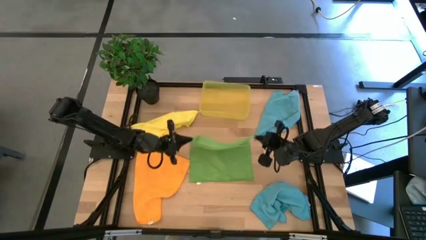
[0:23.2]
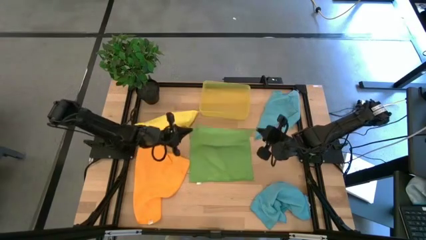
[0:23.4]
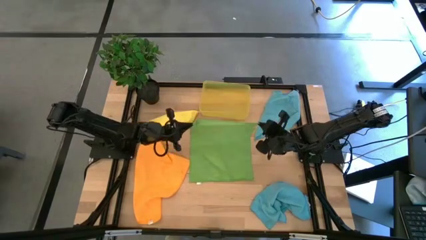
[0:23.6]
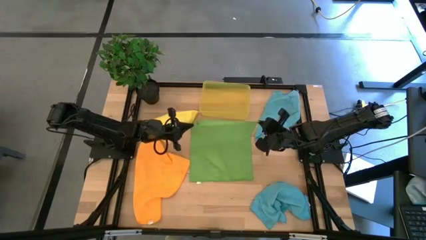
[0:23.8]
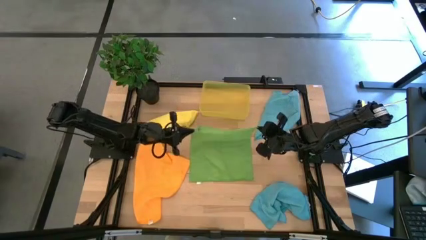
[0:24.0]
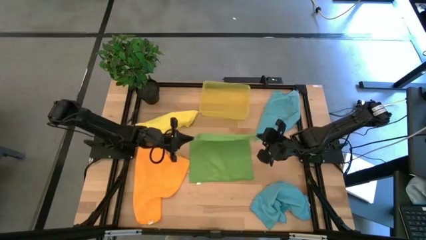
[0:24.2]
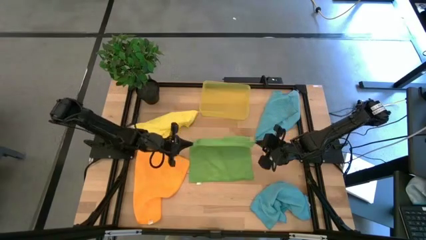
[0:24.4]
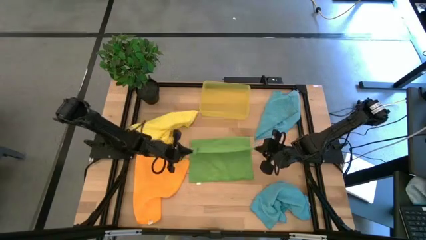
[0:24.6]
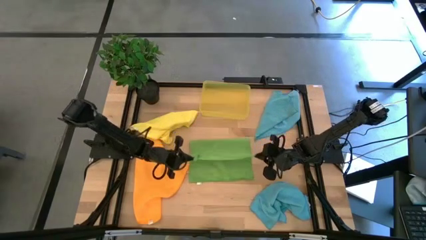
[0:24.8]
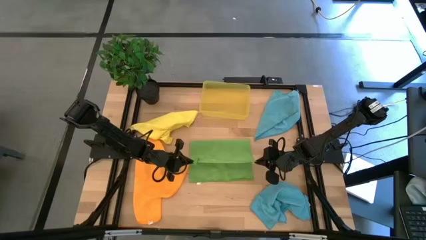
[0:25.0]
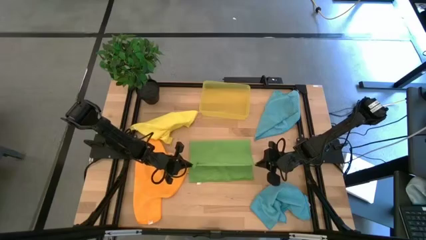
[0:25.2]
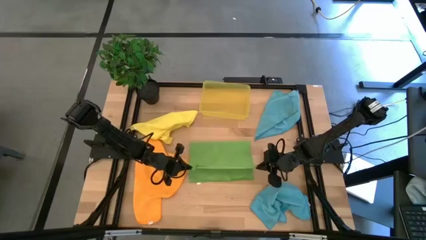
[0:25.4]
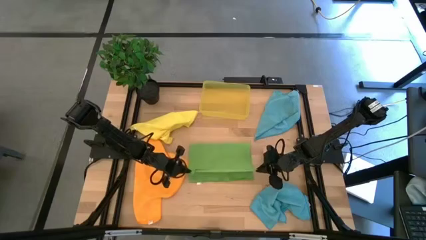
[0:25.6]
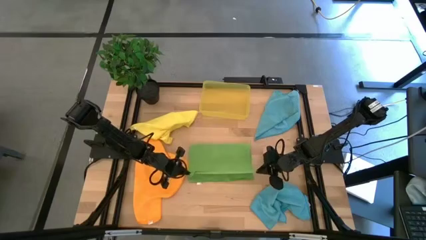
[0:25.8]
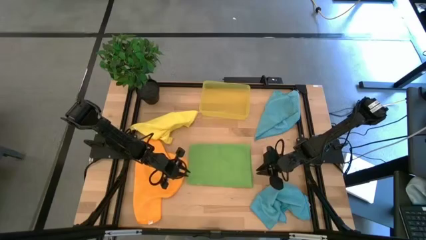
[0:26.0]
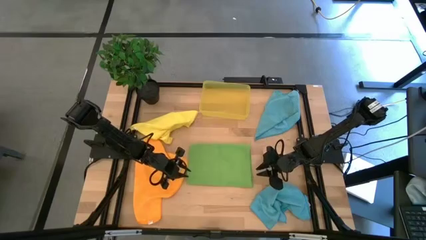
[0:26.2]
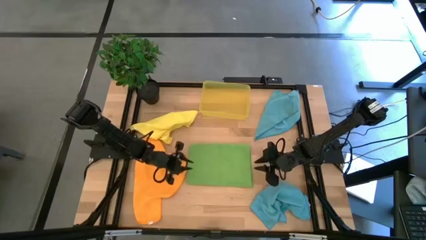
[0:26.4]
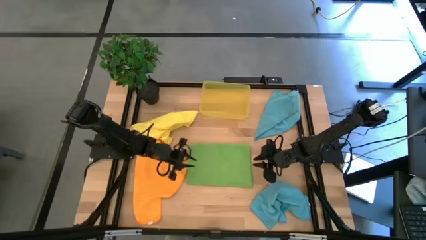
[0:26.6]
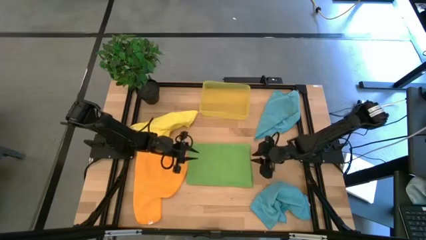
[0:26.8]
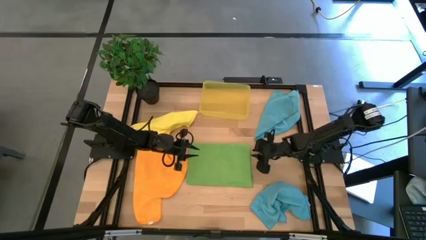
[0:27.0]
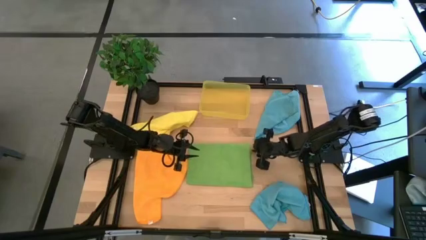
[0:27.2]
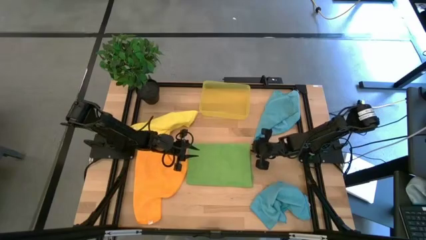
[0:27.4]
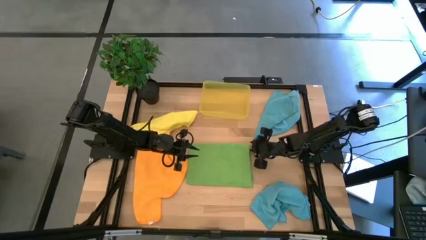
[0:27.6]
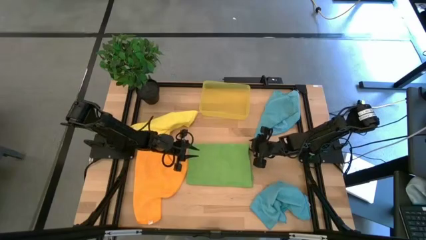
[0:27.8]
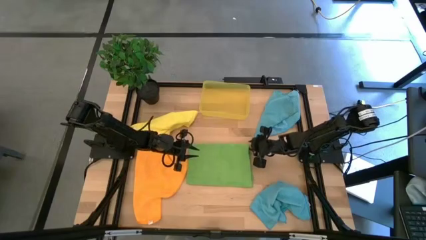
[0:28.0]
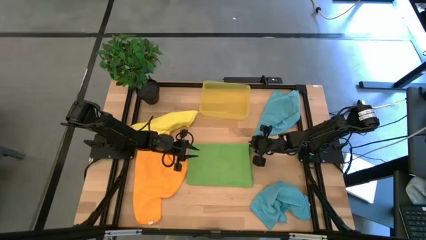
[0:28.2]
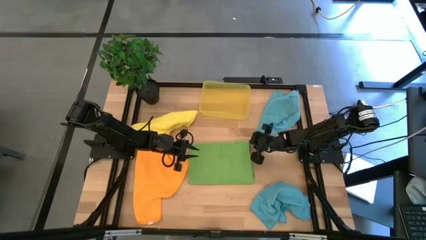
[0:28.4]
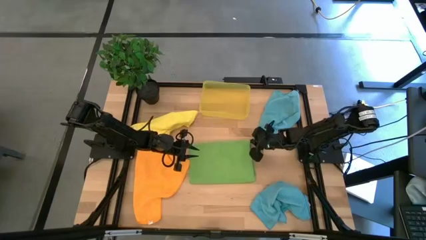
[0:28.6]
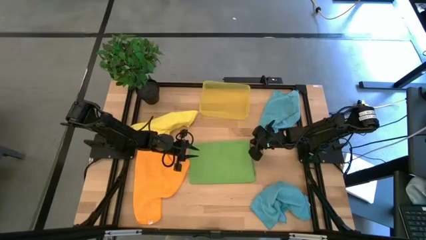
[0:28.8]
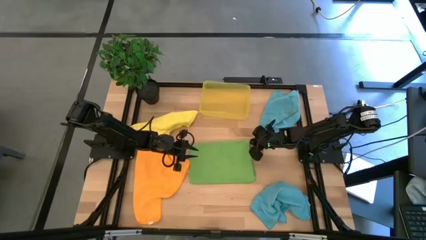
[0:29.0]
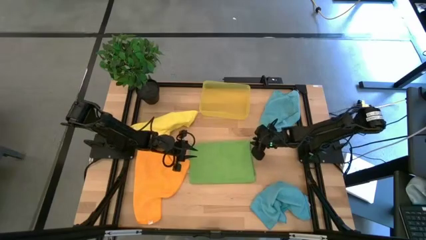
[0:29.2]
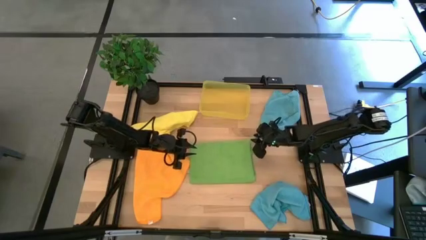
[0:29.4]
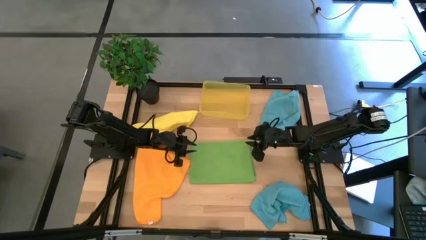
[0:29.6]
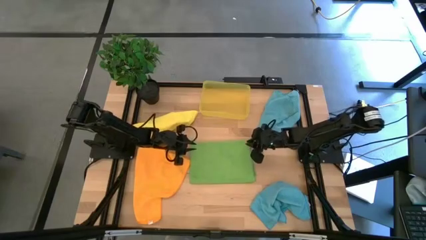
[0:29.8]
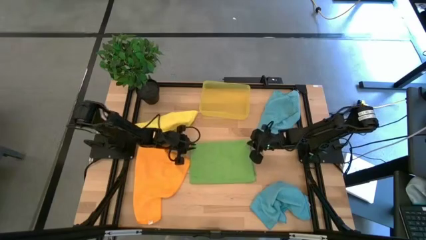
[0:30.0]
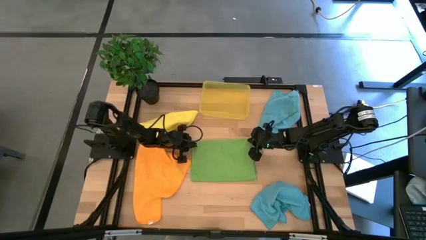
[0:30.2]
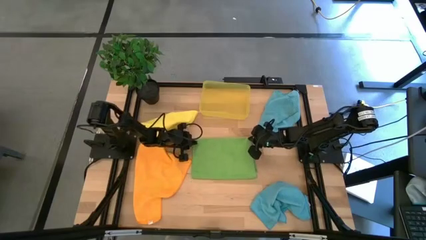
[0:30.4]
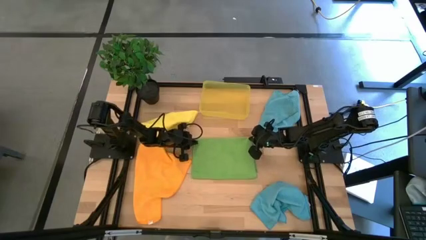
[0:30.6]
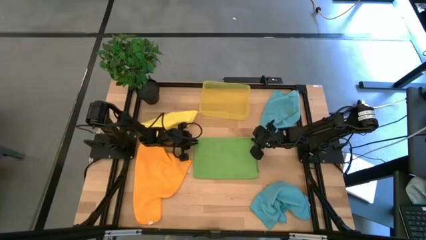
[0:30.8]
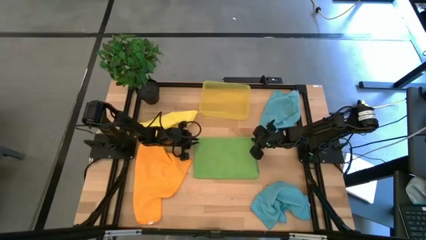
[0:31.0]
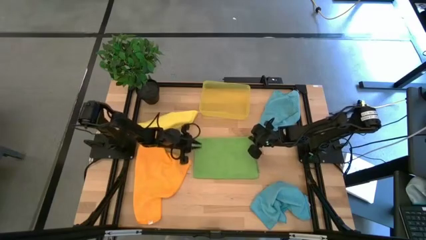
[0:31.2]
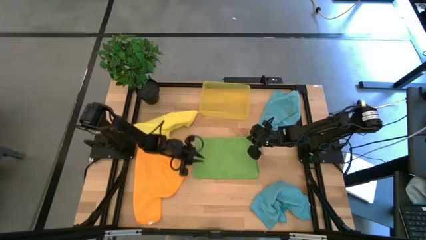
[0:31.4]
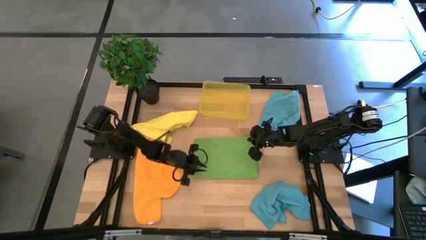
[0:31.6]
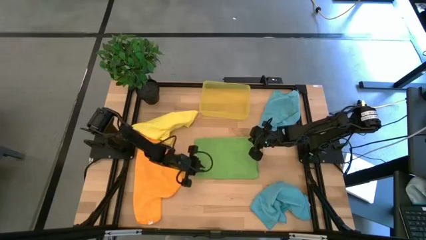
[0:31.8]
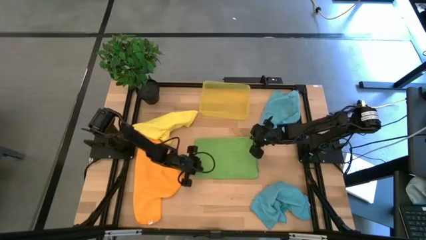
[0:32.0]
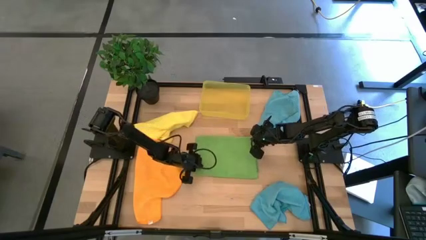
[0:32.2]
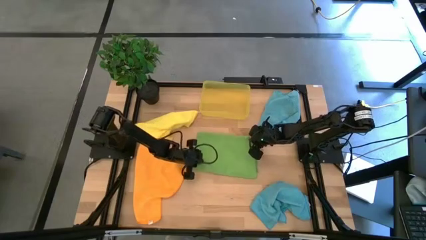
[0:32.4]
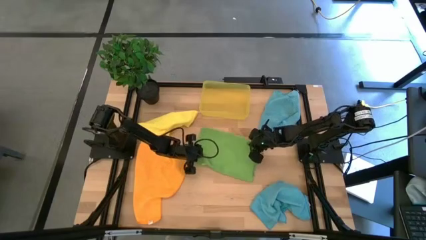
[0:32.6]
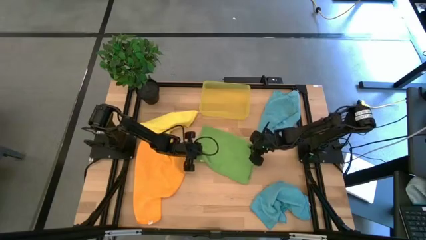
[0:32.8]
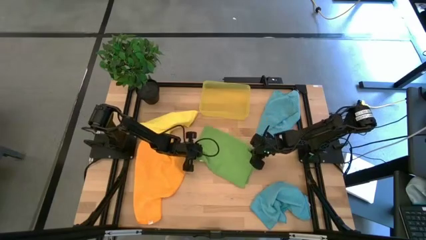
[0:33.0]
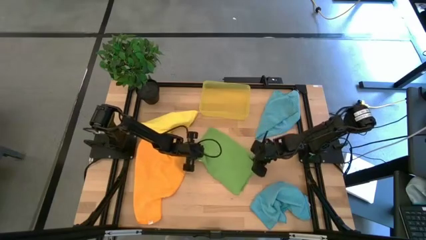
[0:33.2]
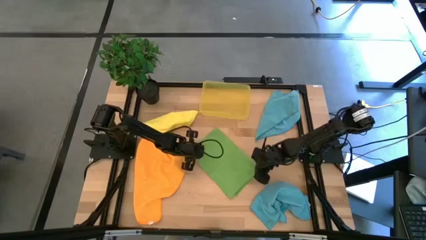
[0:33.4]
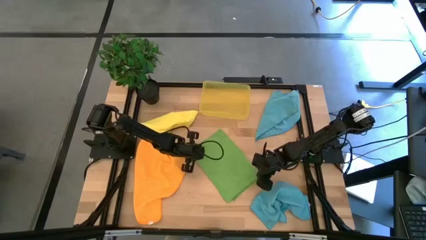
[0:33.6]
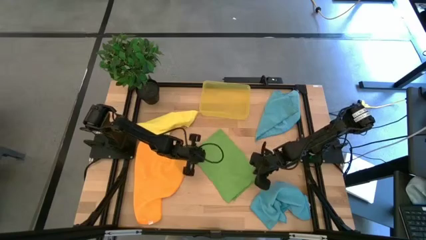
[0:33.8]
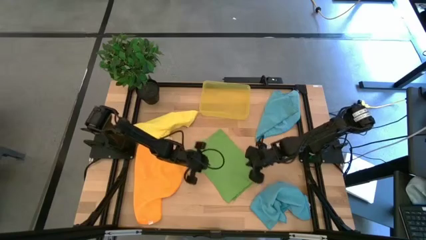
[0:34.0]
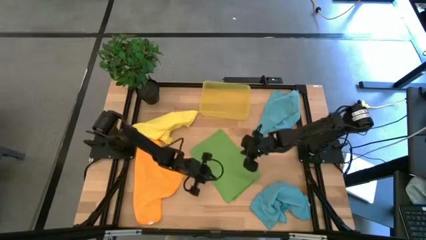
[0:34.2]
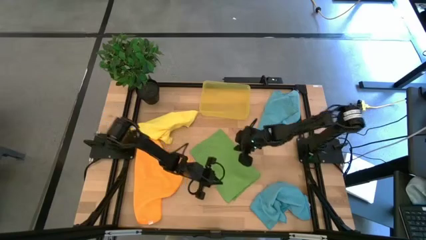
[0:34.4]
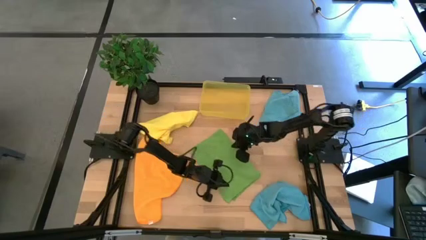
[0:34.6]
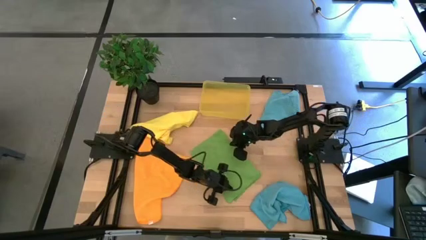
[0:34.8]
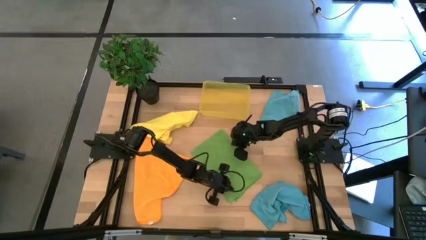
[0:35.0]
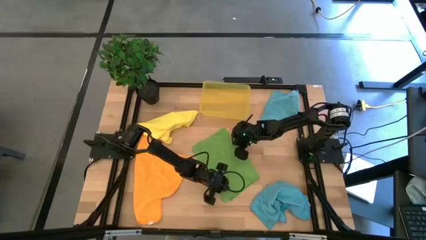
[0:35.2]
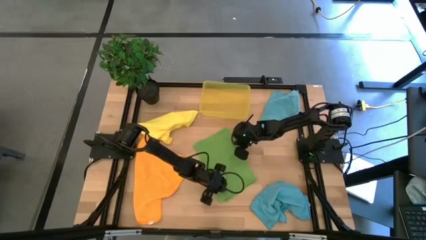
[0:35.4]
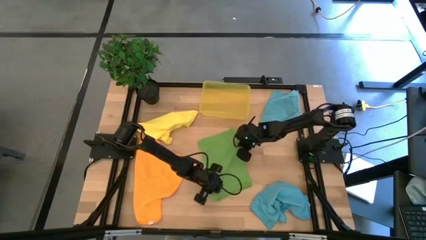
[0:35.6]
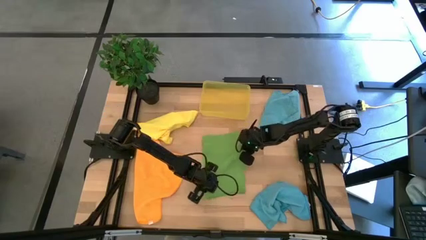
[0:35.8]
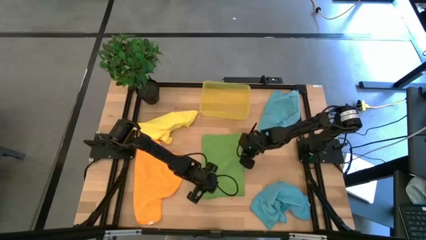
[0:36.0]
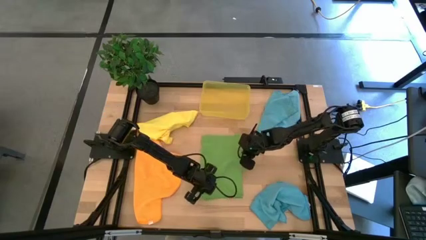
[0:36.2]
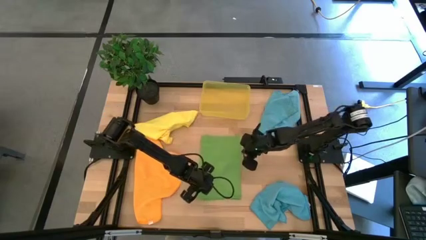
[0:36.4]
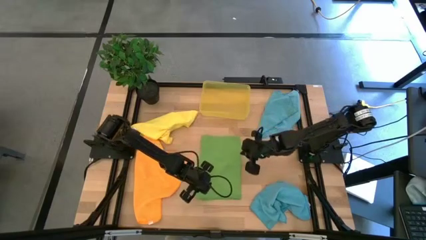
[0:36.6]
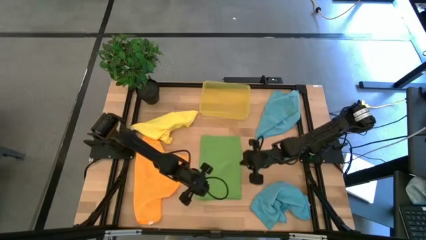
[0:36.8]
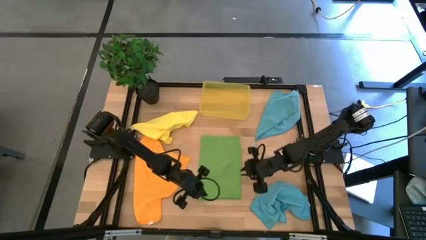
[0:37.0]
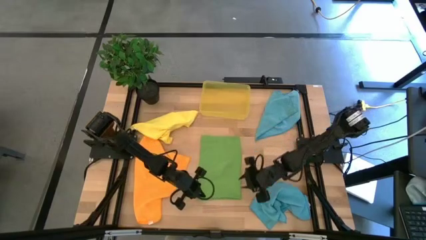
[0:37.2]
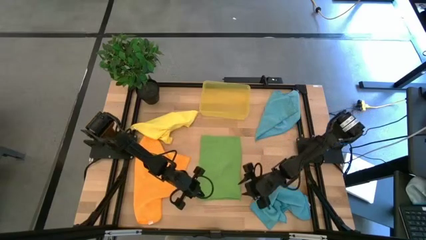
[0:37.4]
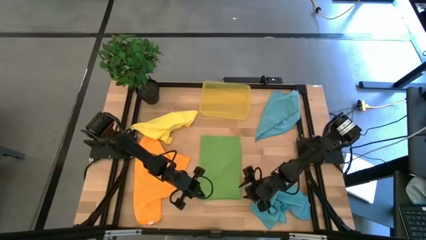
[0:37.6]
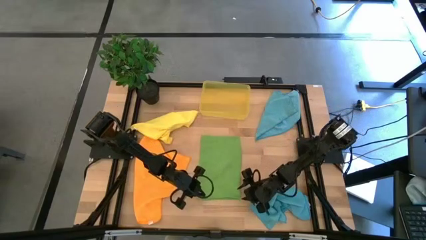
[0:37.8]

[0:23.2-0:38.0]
Task: Fold microfiber towels
Fold the green microfiber cloth
